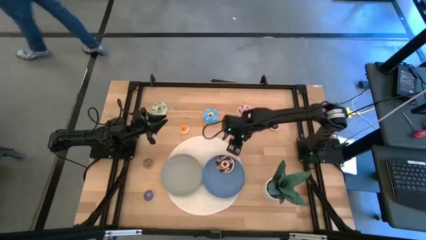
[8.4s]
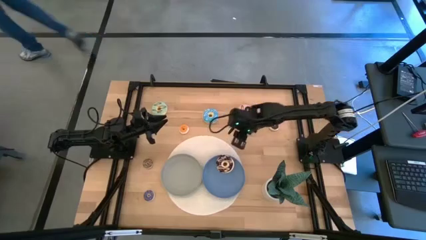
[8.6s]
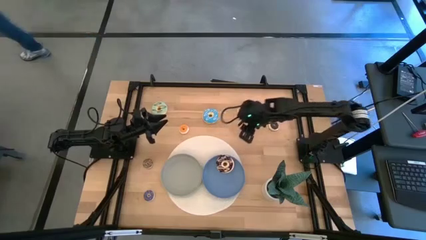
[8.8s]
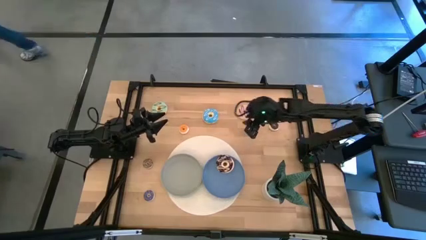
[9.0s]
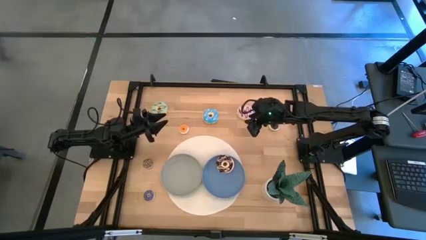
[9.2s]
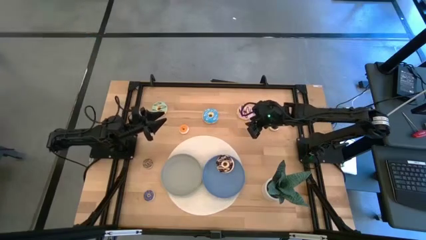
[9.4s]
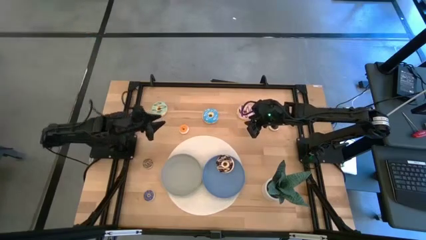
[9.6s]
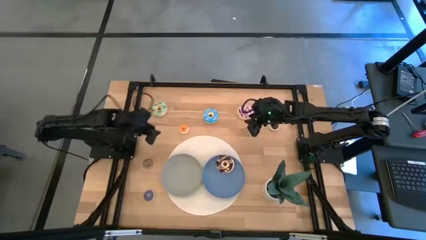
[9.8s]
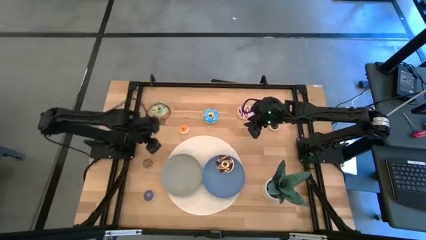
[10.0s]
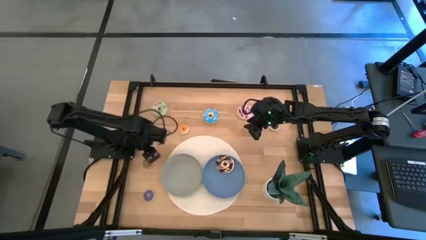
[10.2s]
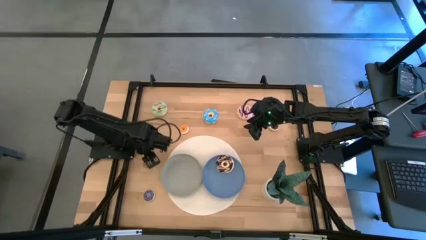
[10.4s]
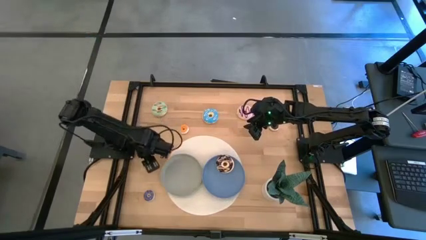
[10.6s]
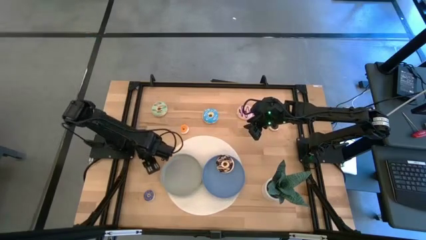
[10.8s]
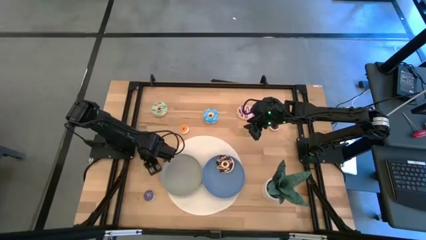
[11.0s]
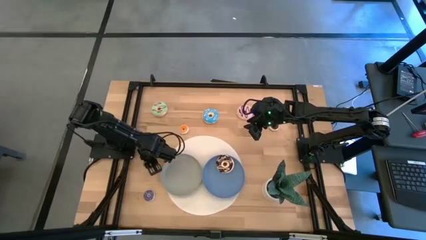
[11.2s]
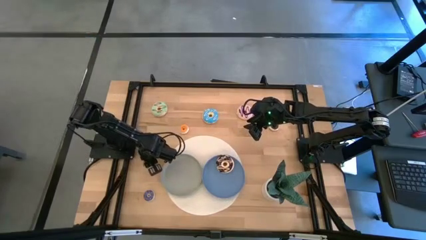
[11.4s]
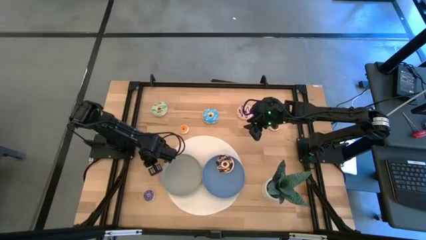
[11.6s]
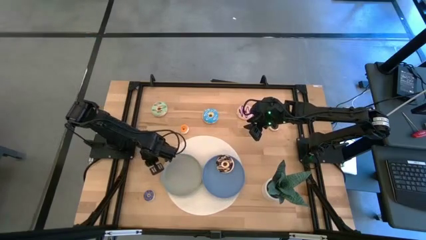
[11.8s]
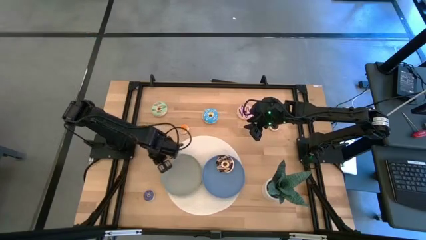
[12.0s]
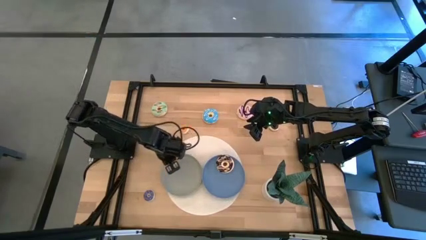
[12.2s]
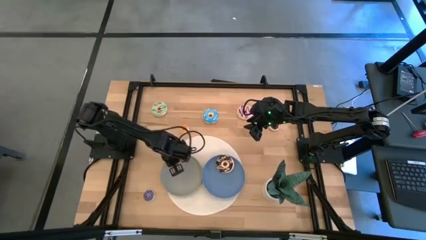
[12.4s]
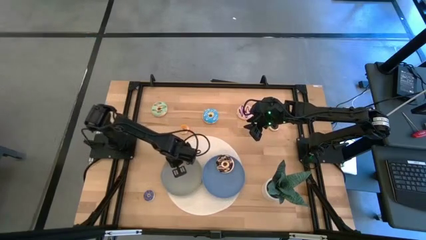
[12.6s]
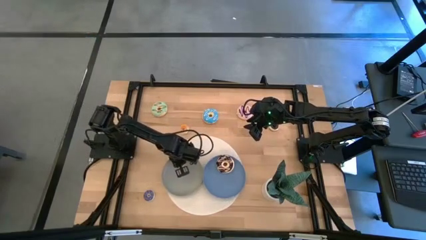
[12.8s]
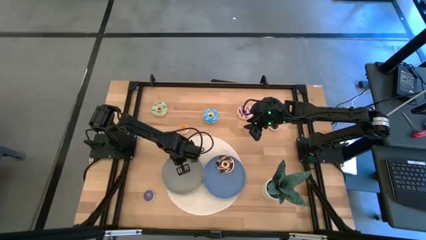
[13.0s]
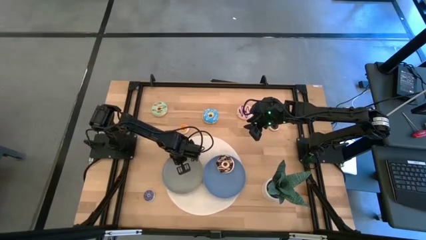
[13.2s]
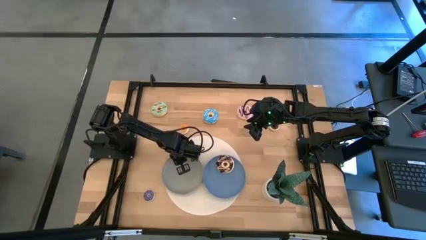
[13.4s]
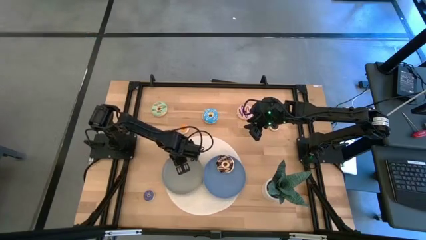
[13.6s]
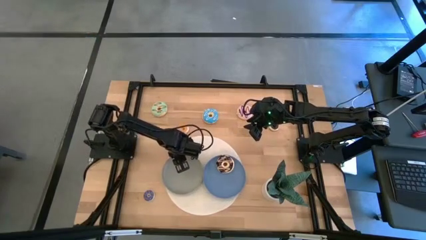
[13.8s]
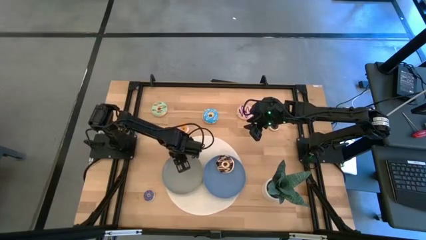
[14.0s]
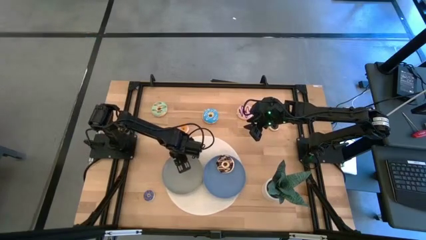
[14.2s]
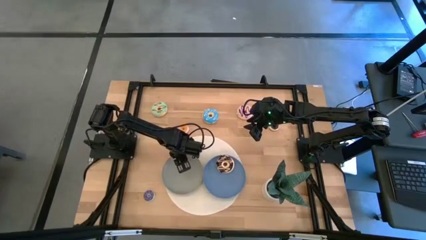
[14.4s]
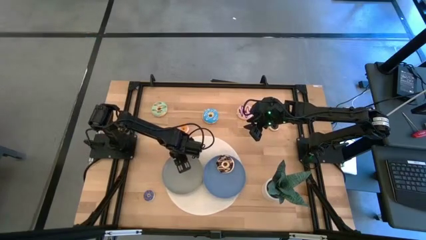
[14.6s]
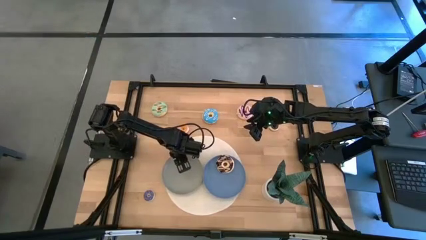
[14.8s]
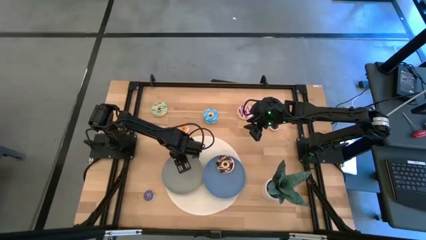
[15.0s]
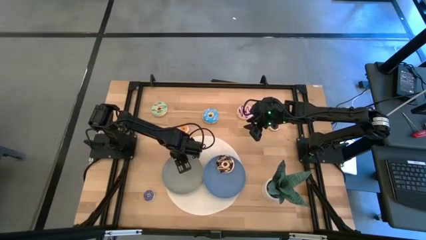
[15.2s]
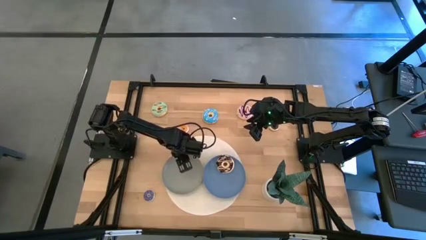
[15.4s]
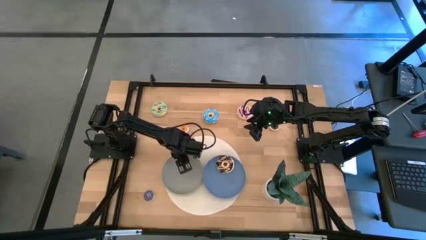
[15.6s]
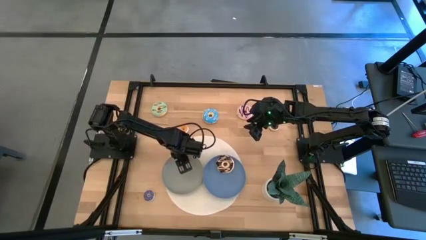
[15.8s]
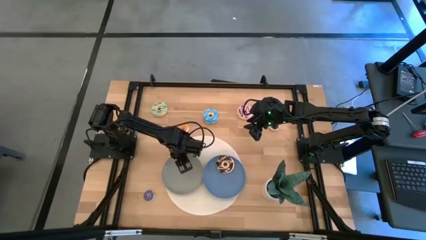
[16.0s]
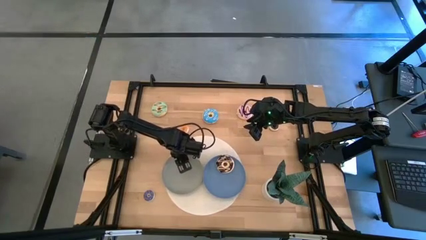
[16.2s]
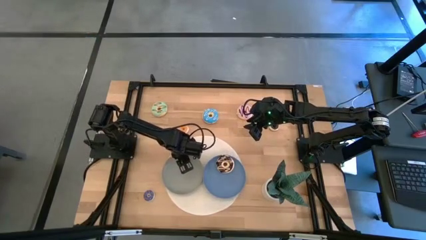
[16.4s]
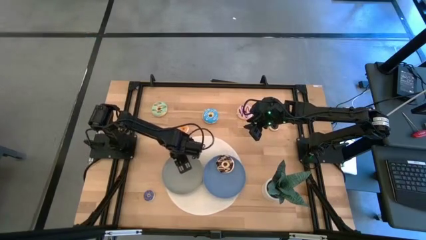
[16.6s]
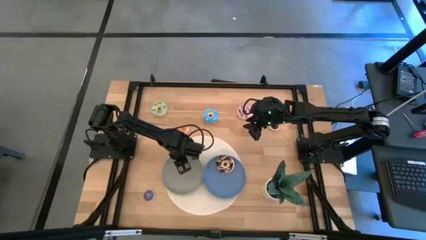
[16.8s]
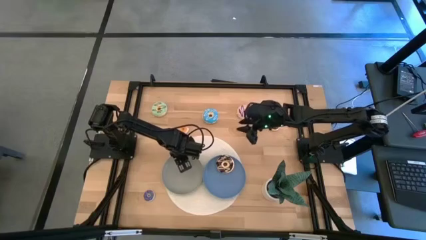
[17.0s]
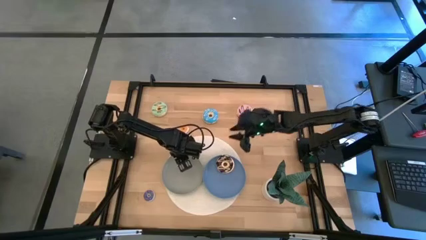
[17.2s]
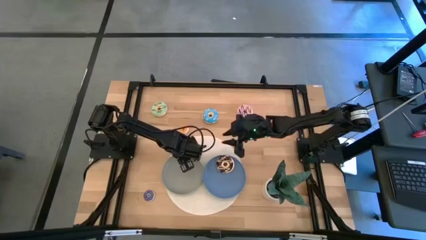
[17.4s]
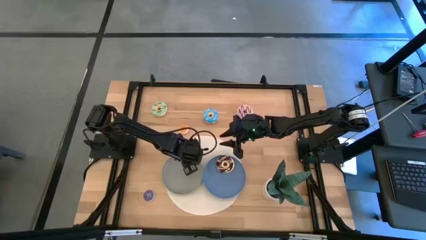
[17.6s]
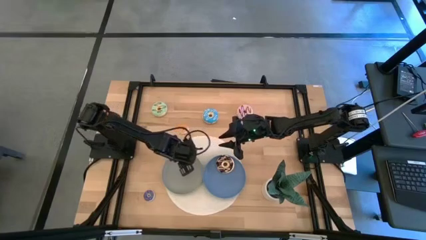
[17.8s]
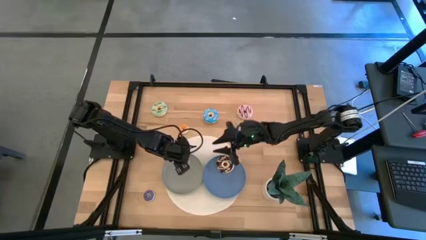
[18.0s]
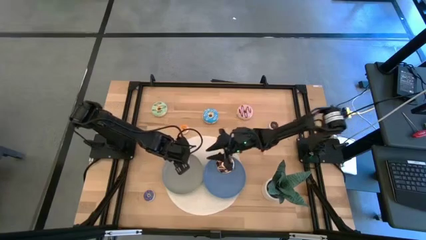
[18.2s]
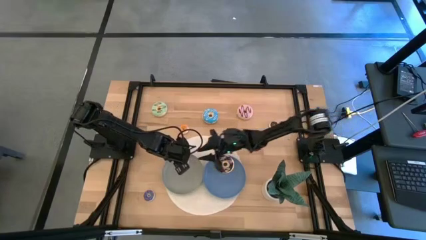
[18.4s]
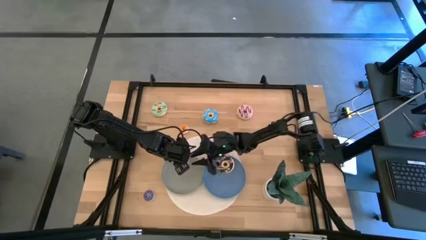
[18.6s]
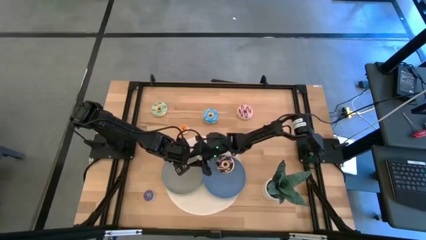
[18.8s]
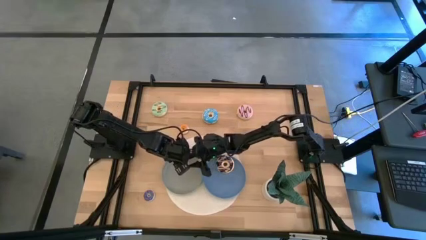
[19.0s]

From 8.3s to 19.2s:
Task: Pick & Place donuts
Put the small brown donut on the gray plate

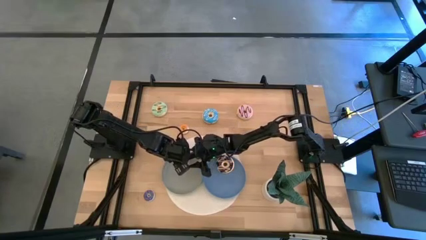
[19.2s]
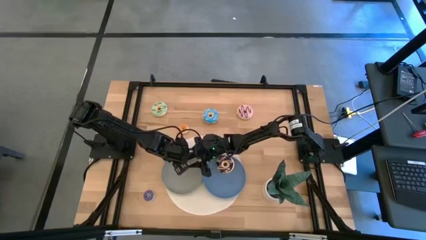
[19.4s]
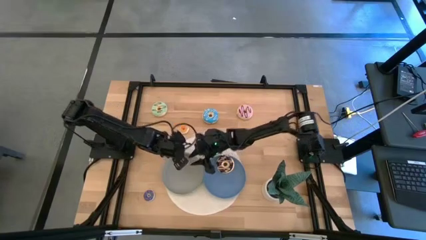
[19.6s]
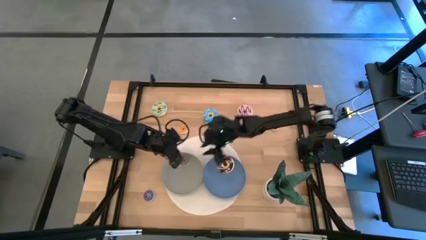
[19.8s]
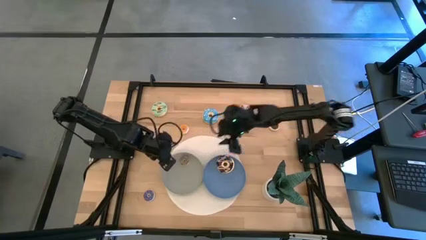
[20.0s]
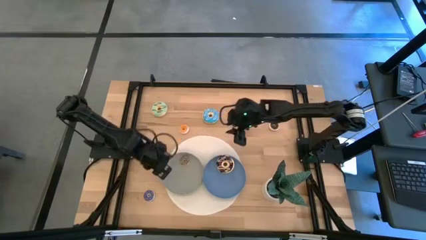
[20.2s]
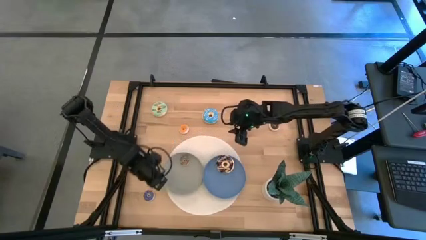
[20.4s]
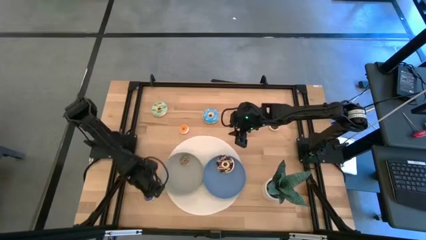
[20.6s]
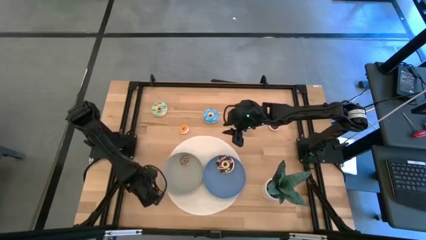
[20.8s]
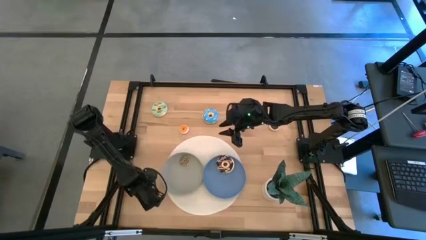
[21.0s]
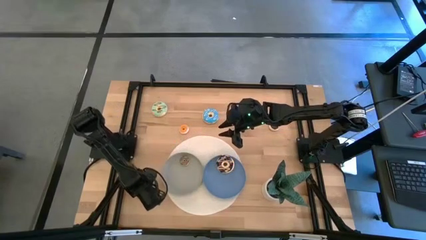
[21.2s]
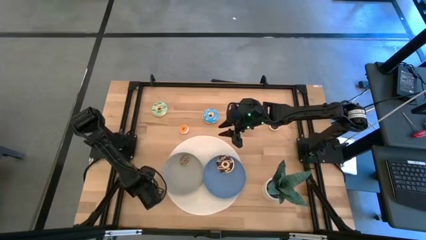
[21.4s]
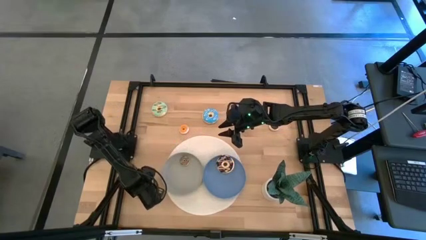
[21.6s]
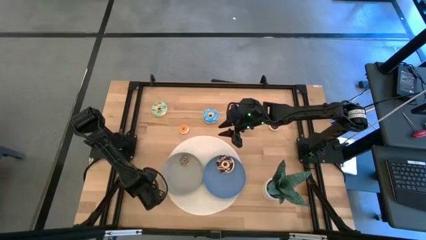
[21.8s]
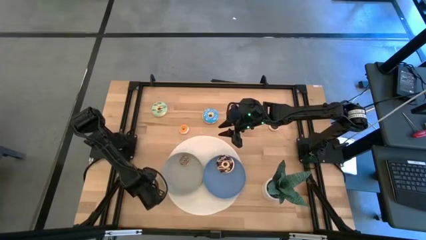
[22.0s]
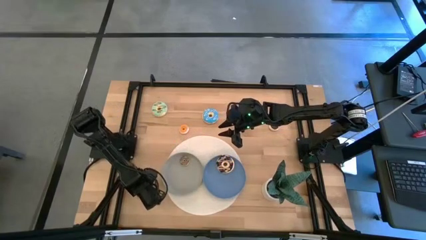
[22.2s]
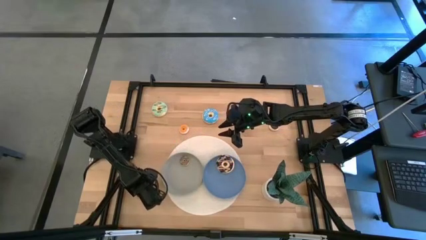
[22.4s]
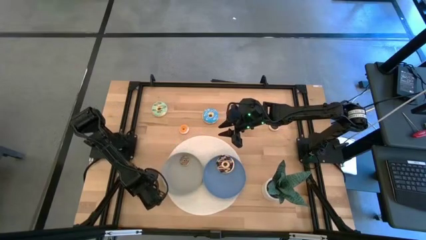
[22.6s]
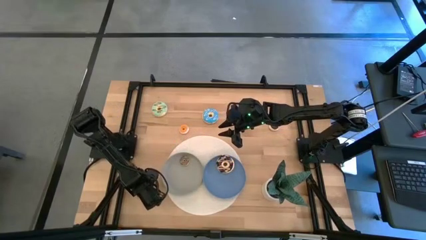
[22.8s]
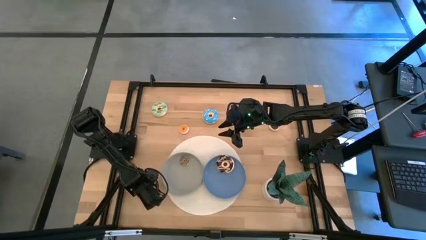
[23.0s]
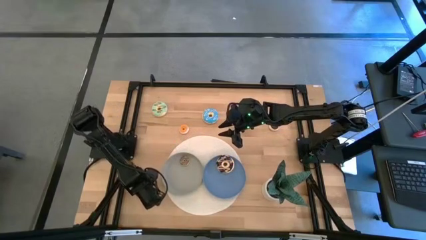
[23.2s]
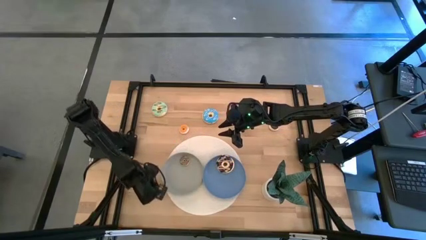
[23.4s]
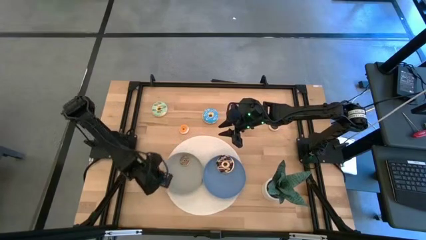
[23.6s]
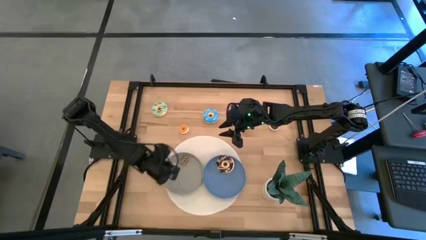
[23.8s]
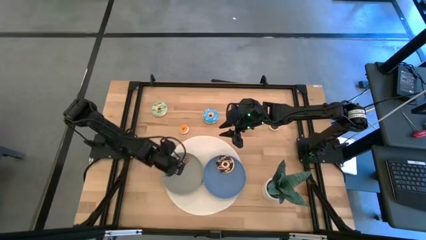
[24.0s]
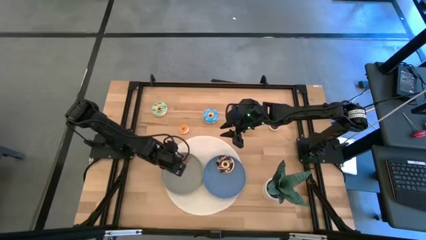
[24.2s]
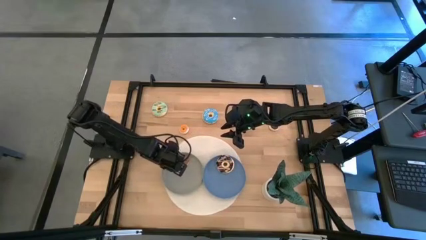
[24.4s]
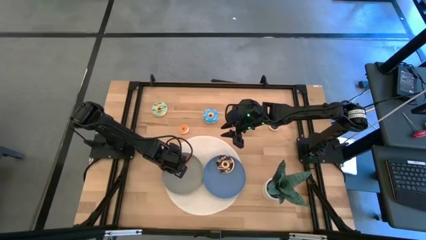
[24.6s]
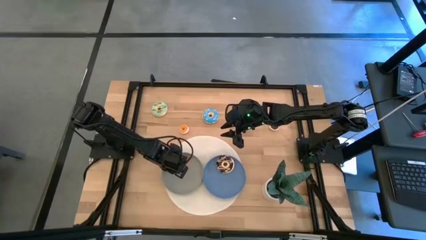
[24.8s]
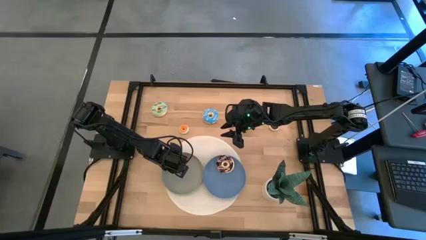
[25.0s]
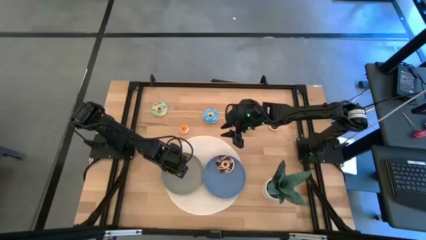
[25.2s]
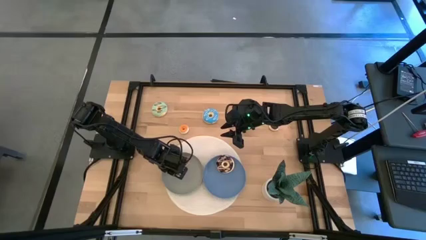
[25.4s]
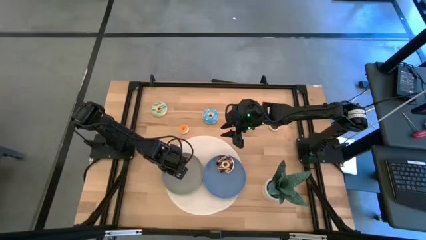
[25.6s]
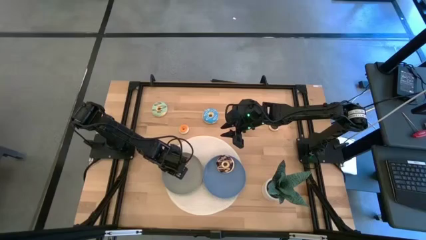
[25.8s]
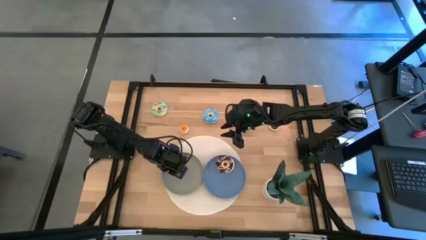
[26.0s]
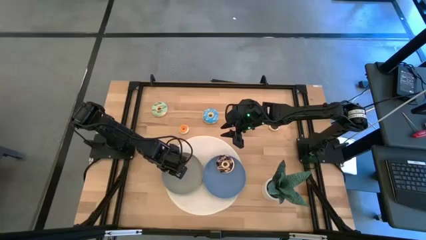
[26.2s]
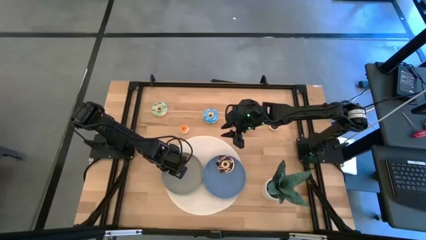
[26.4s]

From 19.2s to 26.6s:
Put the small blue donut on the gray plate
